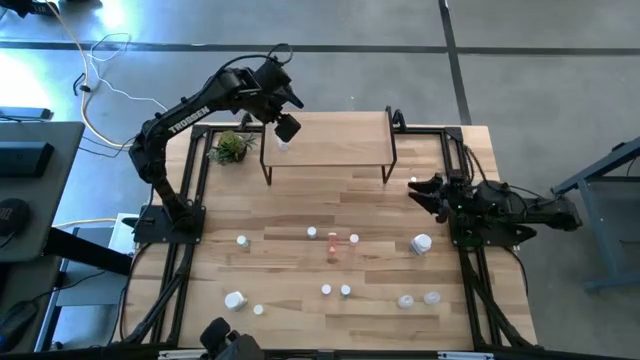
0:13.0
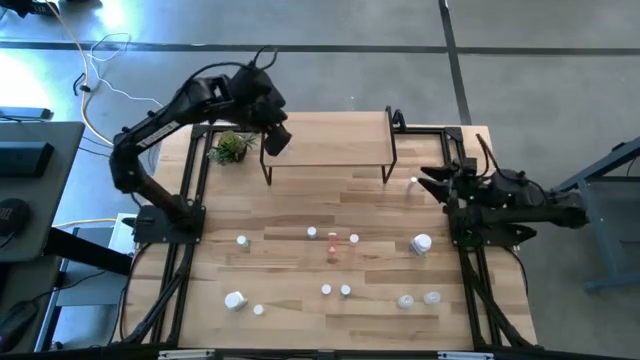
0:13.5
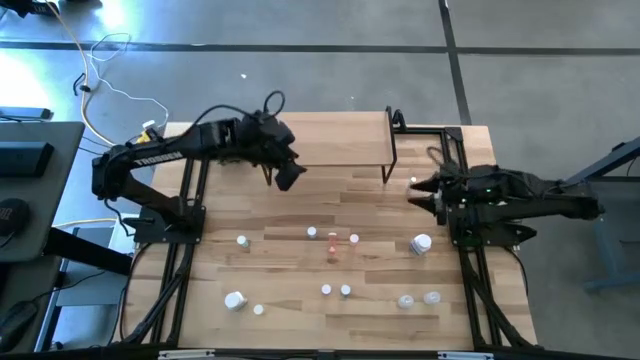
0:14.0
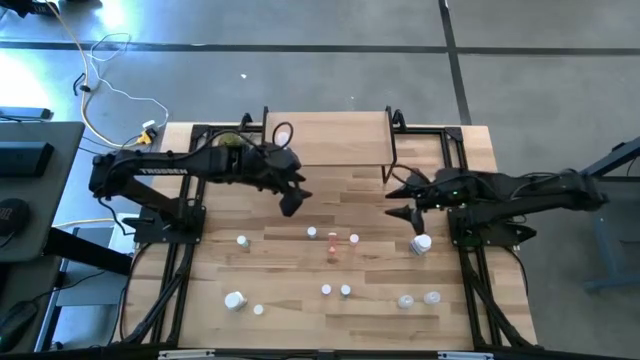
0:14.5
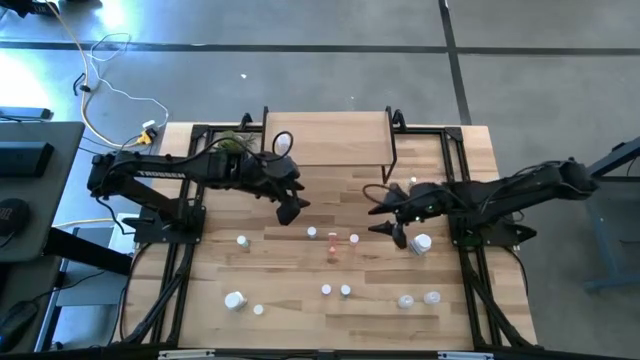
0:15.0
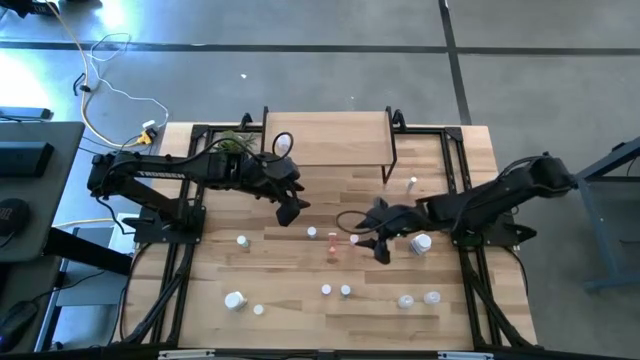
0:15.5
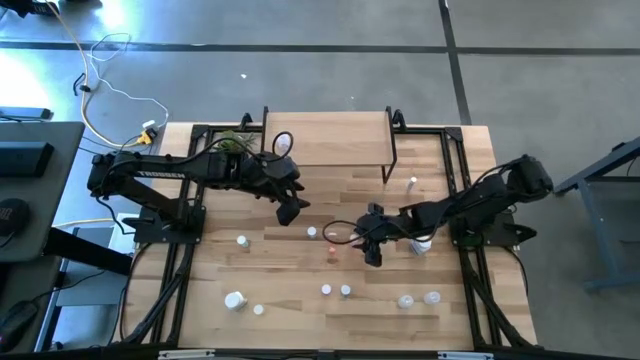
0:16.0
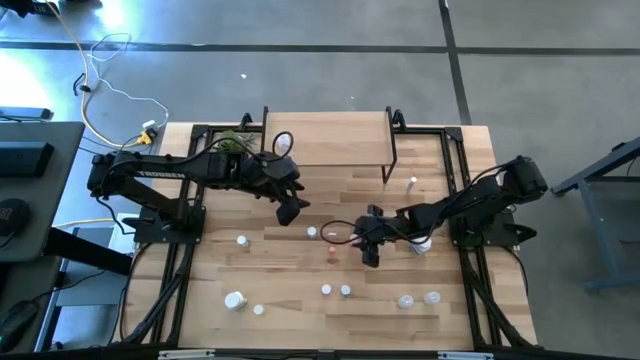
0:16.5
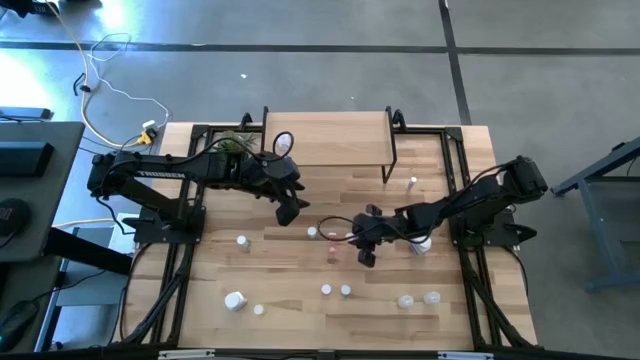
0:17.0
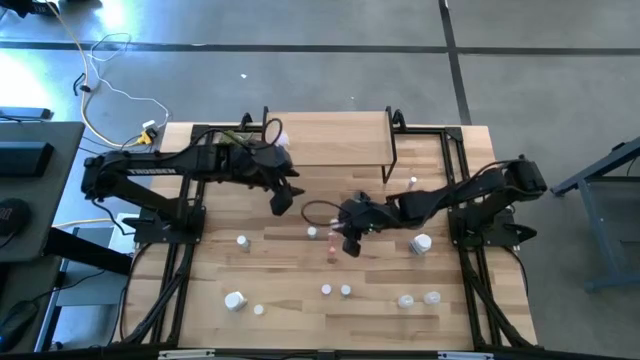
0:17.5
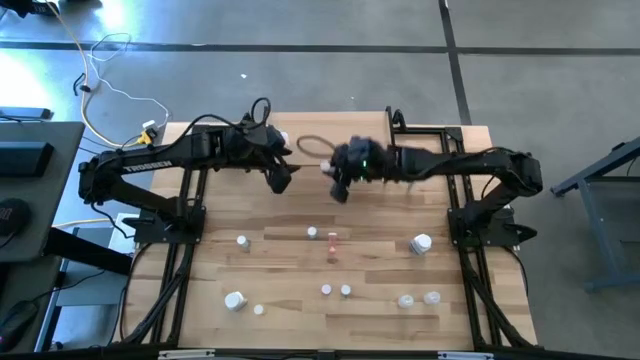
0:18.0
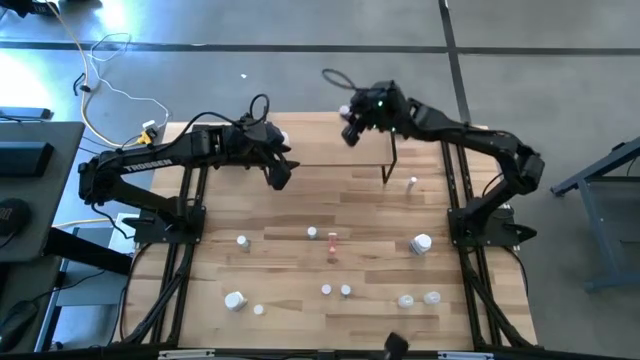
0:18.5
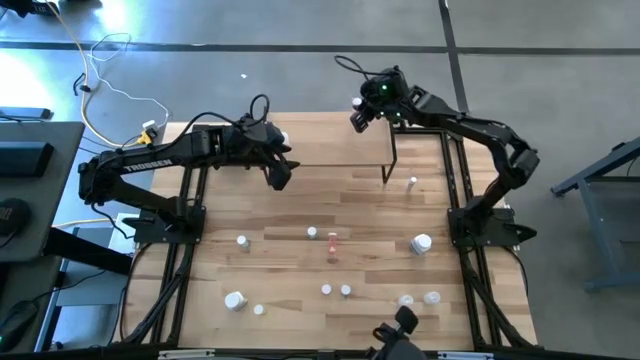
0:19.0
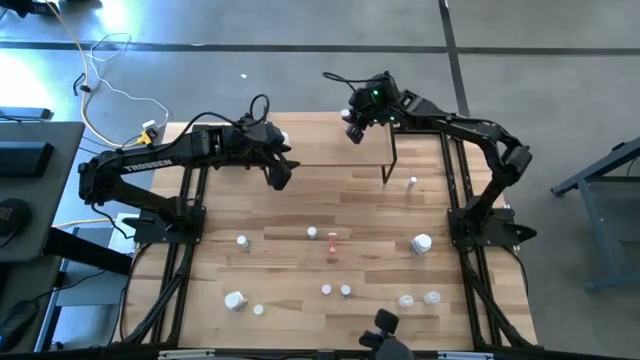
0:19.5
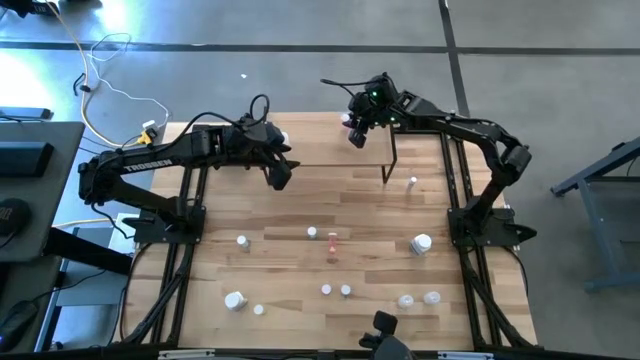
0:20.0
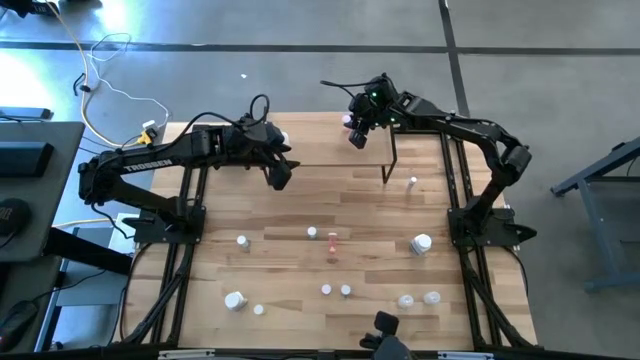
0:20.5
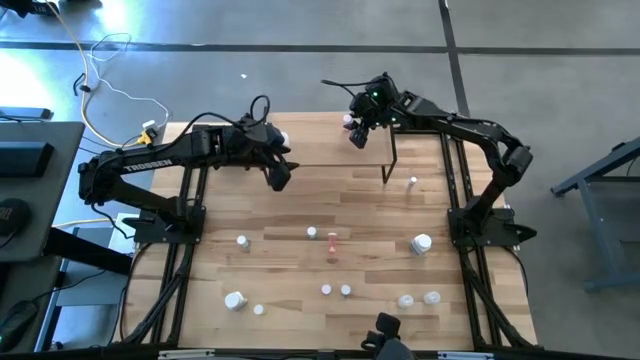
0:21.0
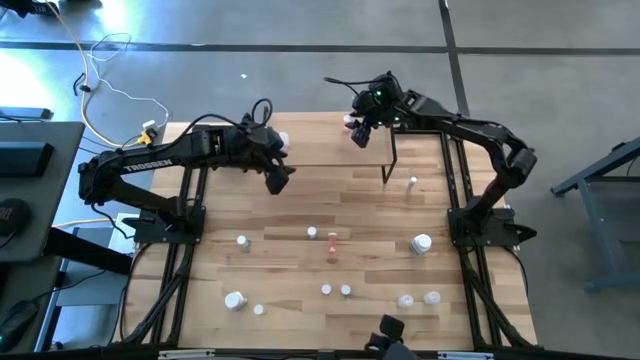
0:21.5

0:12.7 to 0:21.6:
Task: Pick and place medicine bottles onto shelf by color
Put the right pink pill bottle on the shelf

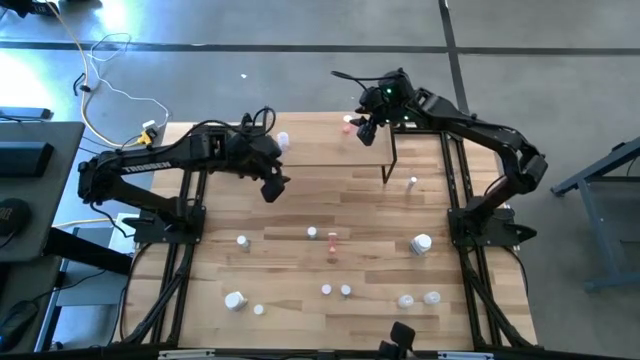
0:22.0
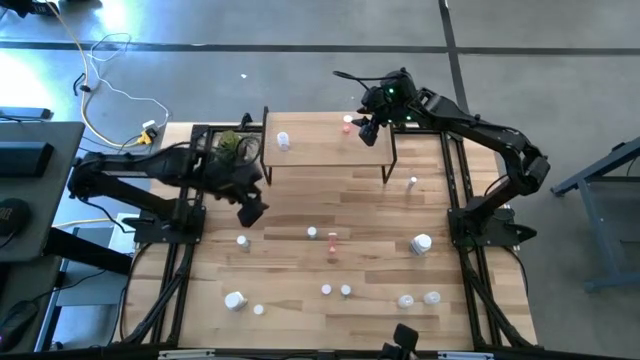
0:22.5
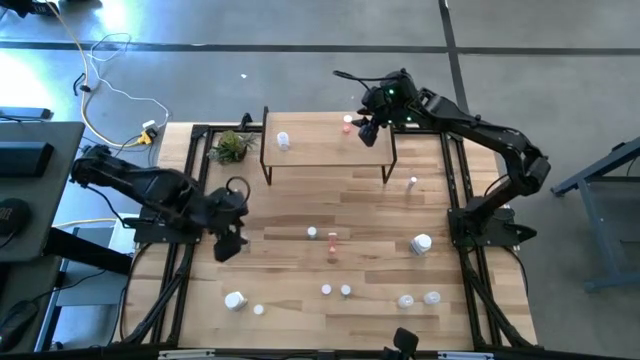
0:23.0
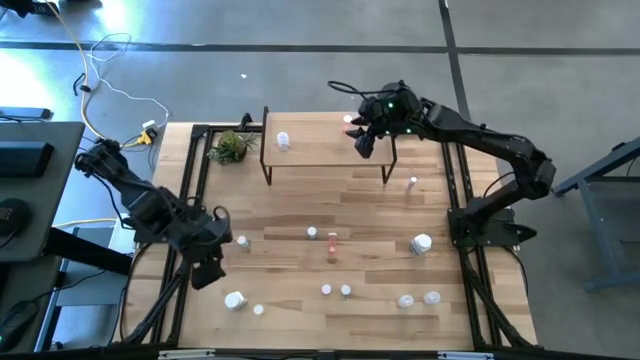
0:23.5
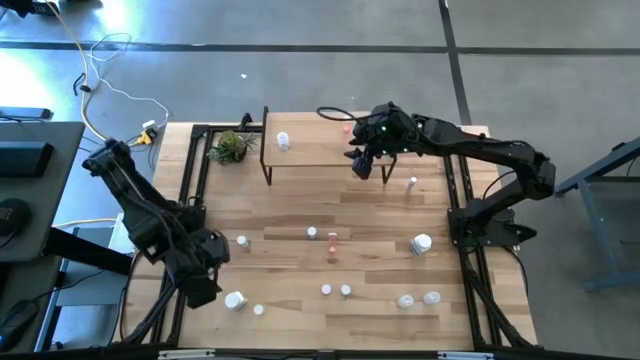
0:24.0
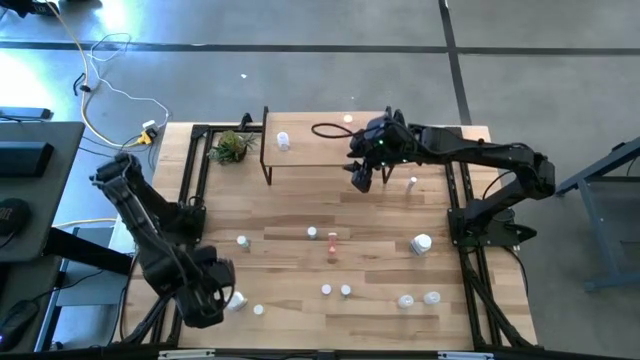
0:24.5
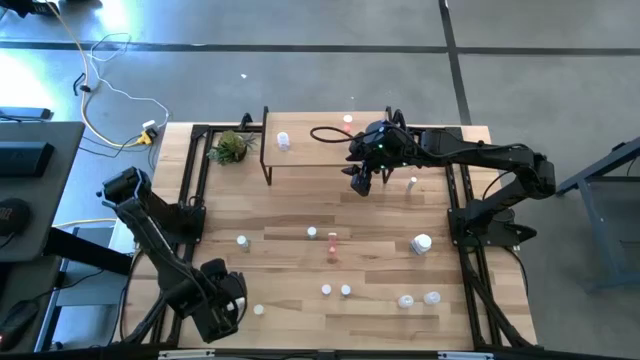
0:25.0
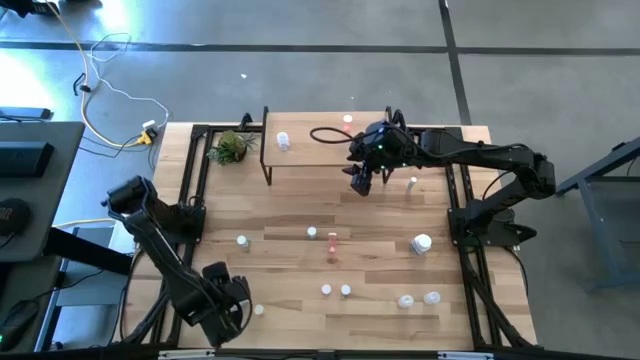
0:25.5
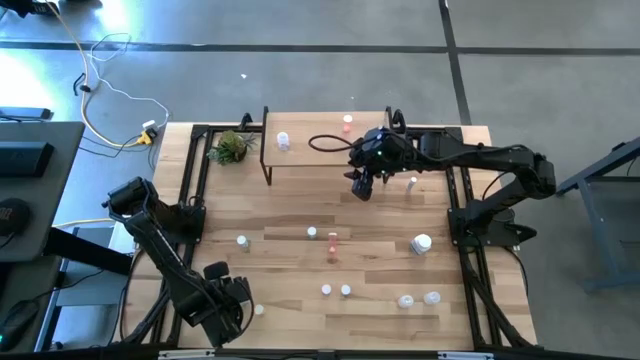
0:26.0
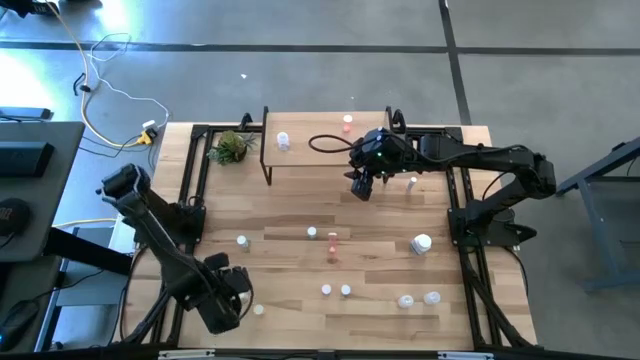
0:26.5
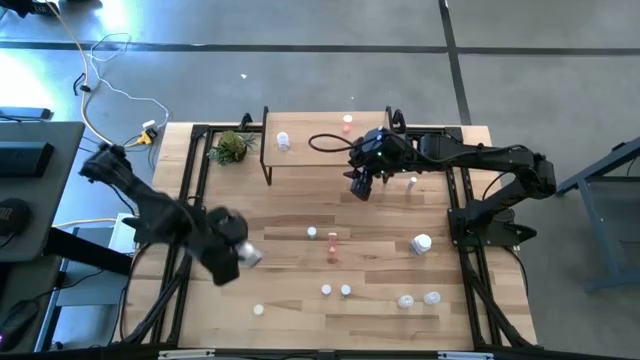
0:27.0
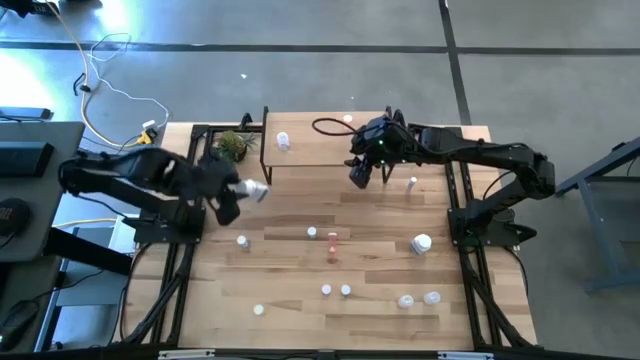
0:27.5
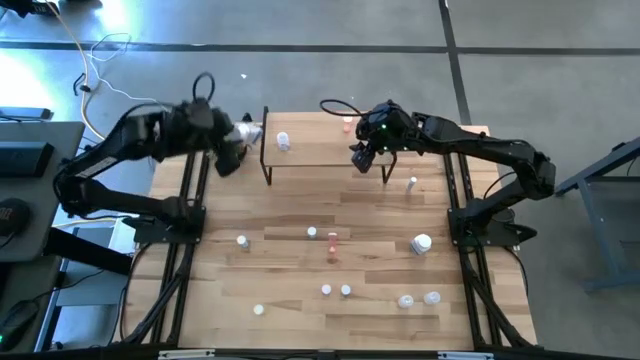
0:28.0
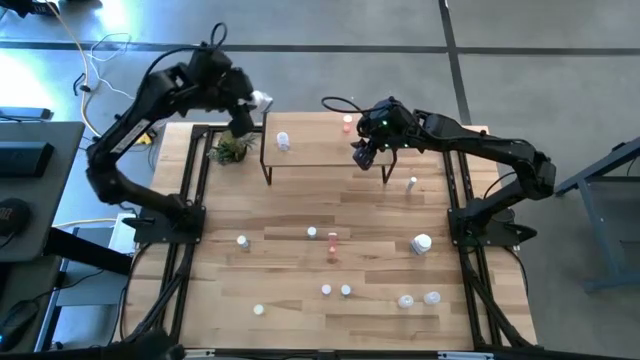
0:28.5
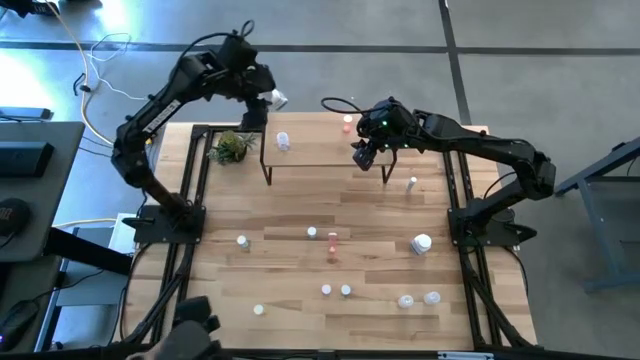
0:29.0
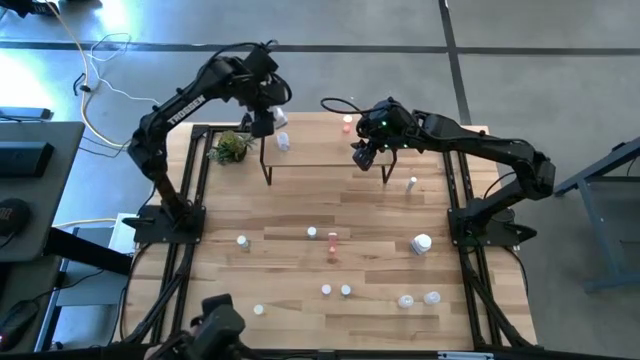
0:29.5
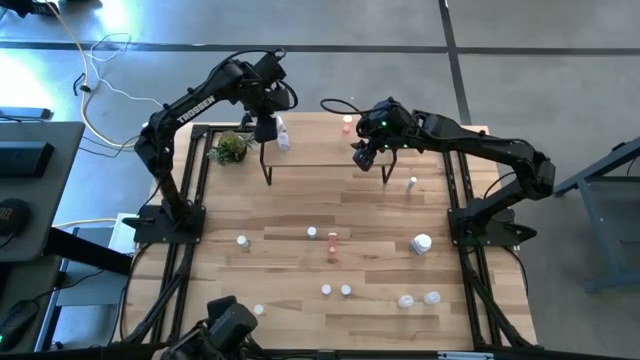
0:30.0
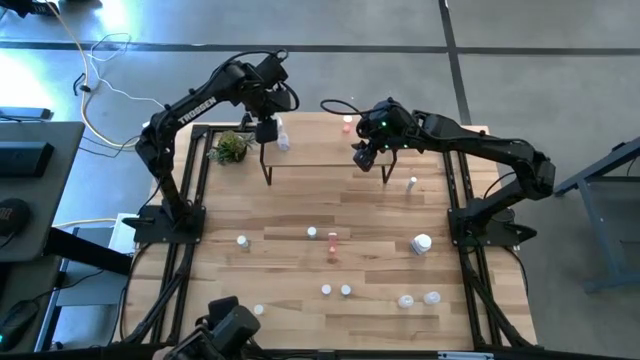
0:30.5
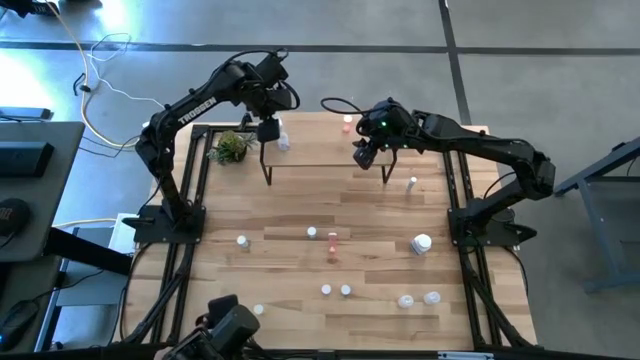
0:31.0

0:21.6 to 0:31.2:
Put the left large white blue pill bottle on the shelf

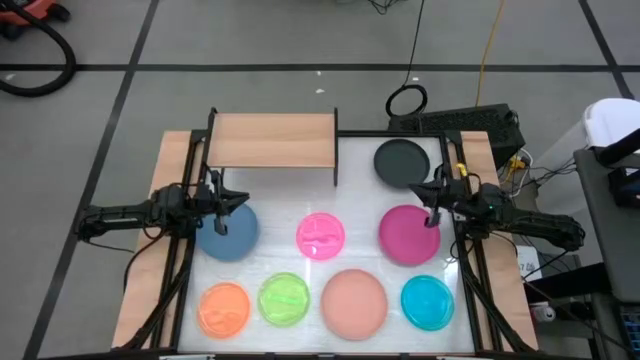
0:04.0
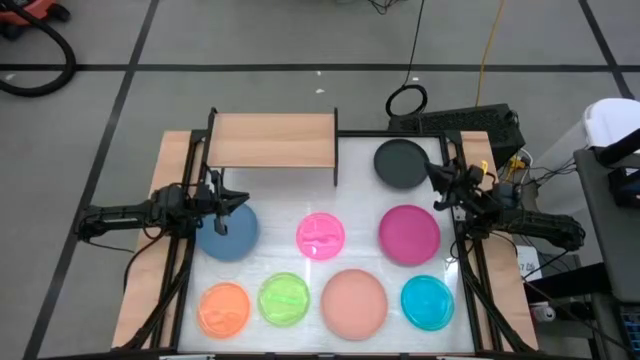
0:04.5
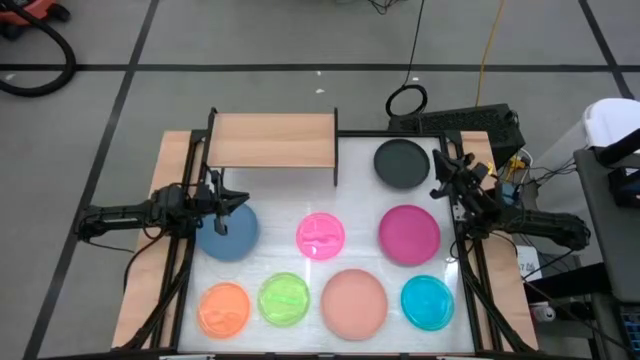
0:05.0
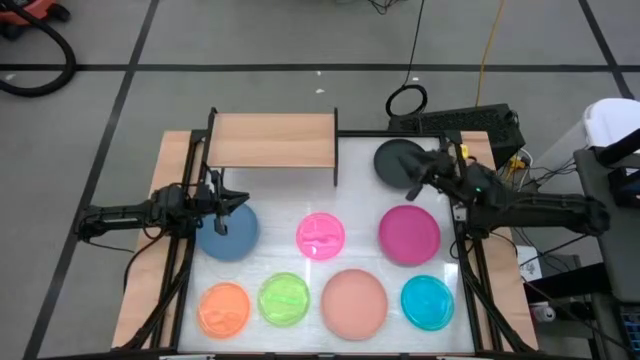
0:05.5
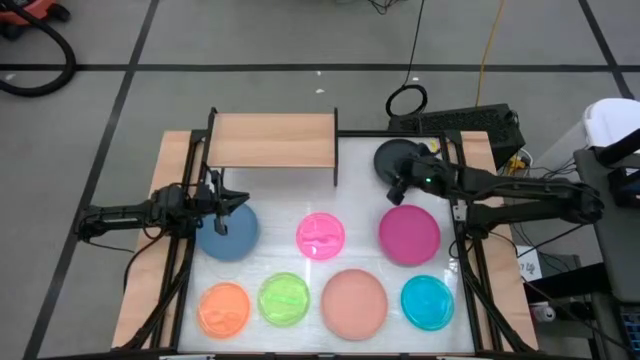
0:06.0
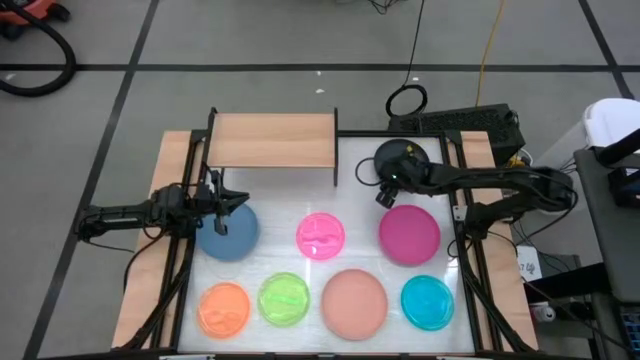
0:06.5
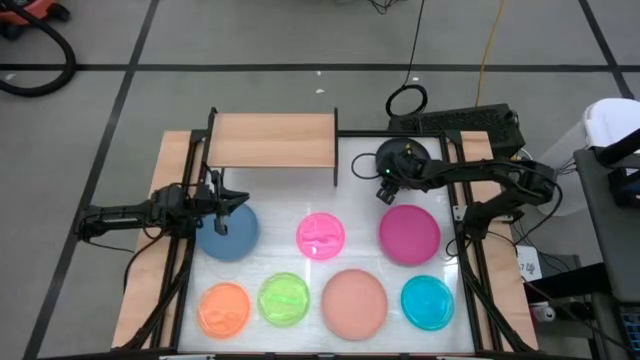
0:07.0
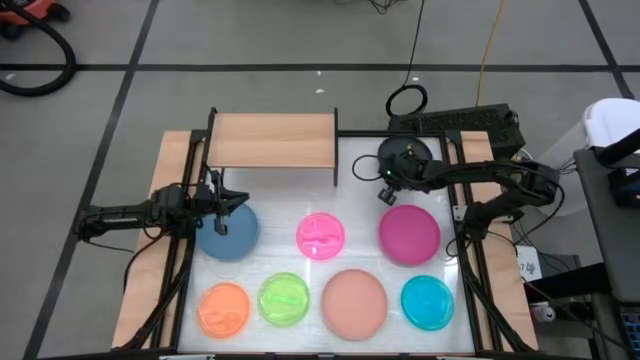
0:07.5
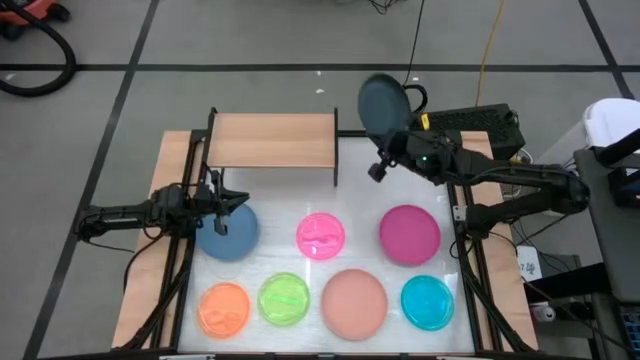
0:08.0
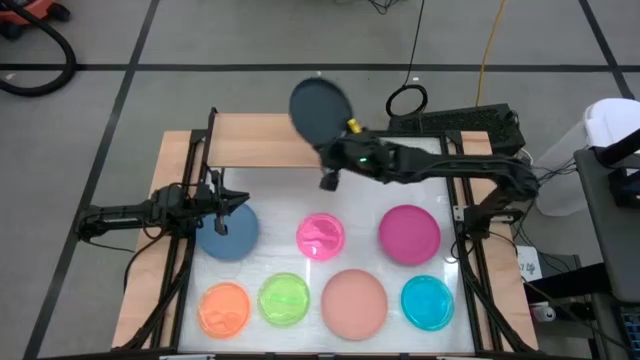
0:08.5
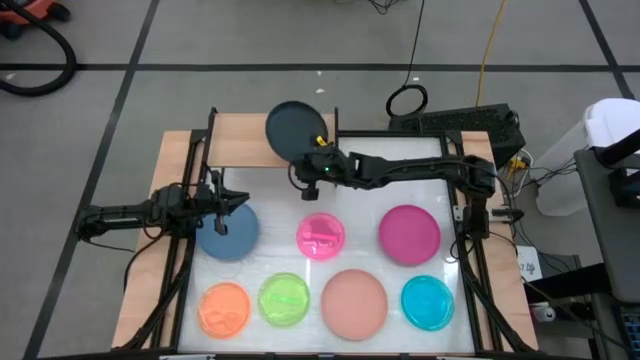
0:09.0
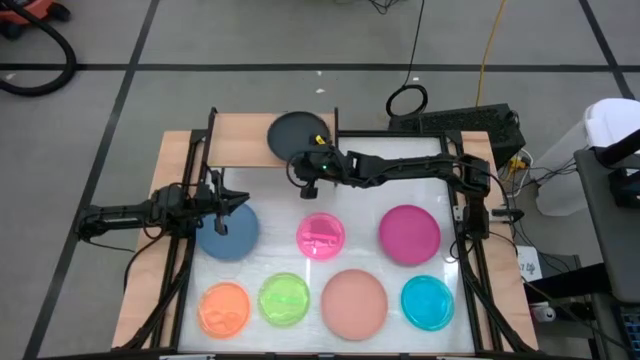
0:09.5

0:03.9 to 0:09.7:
Task: Place and stack plates onto a shelf
Put the black plate on the shelf
